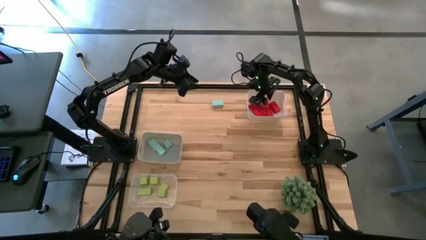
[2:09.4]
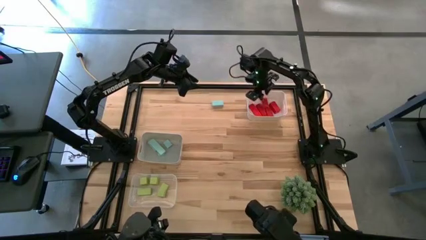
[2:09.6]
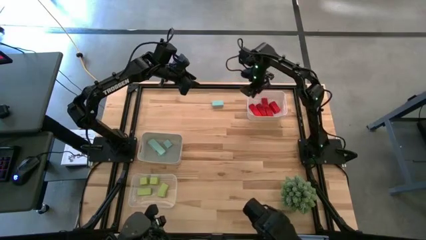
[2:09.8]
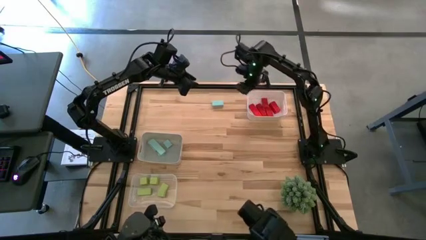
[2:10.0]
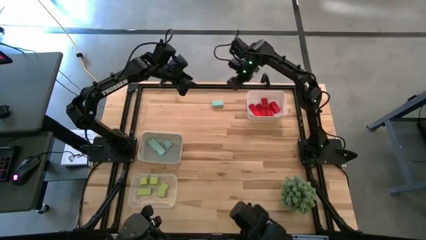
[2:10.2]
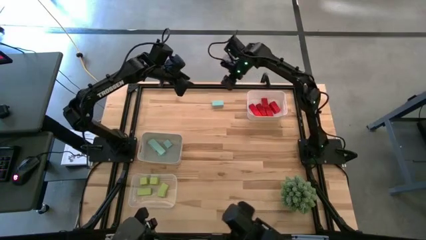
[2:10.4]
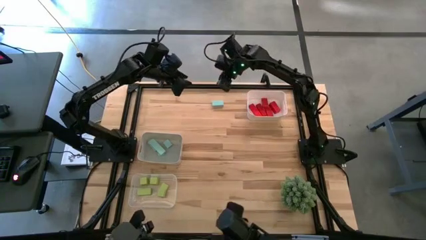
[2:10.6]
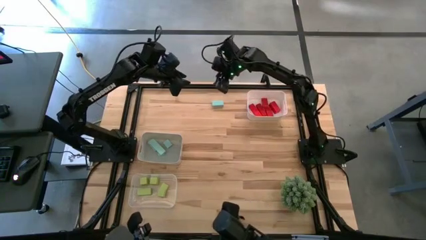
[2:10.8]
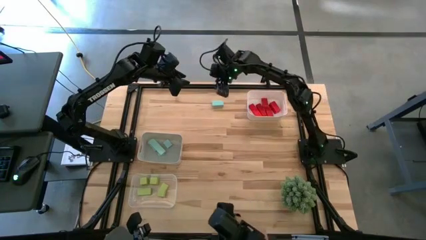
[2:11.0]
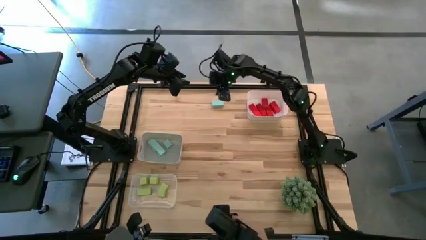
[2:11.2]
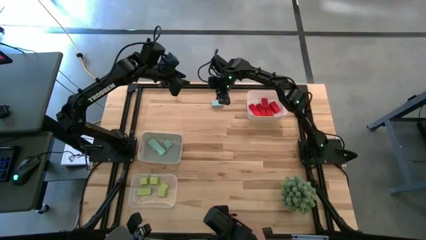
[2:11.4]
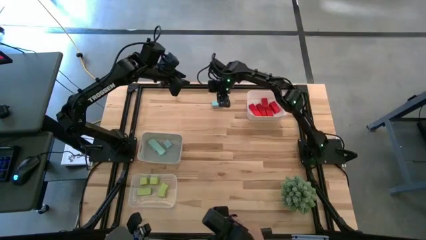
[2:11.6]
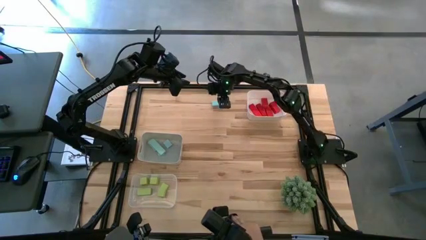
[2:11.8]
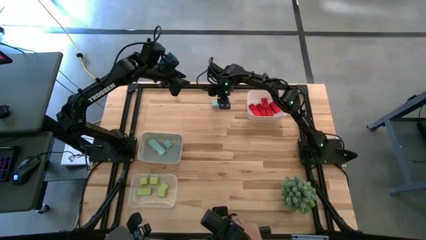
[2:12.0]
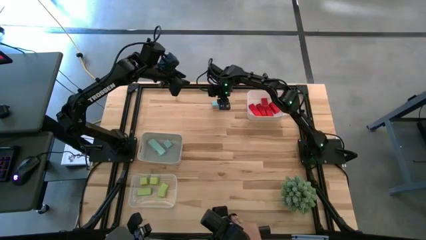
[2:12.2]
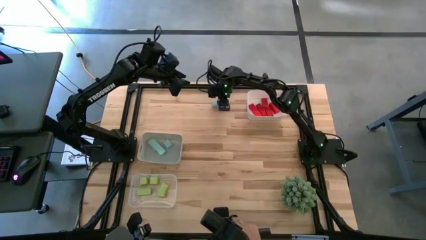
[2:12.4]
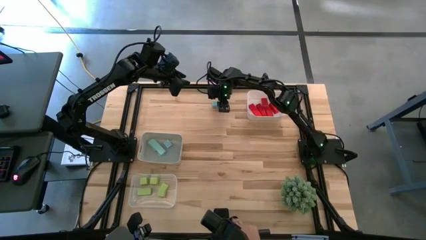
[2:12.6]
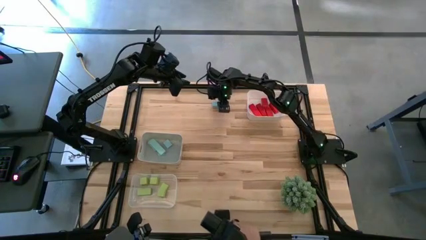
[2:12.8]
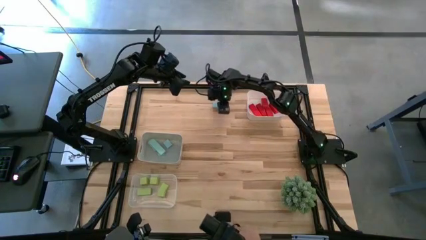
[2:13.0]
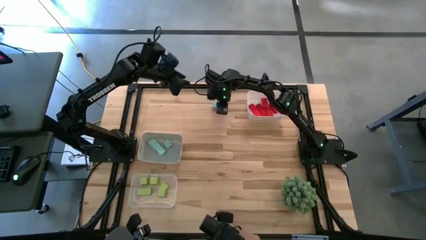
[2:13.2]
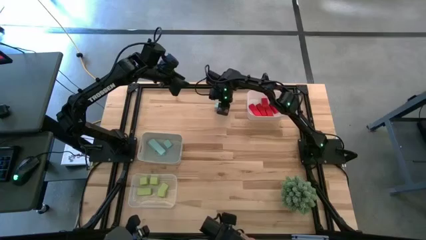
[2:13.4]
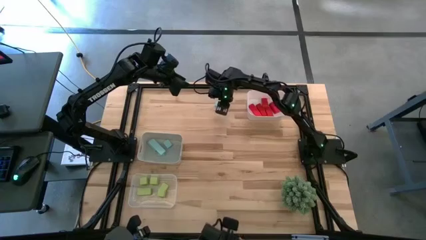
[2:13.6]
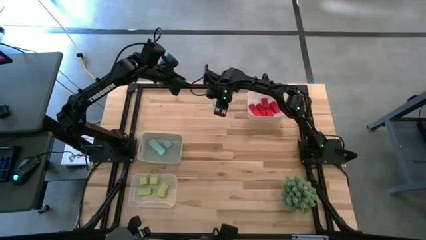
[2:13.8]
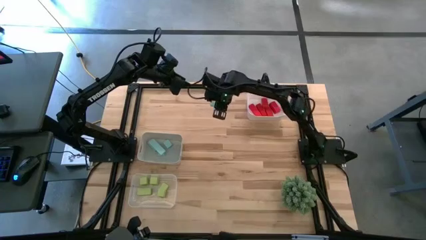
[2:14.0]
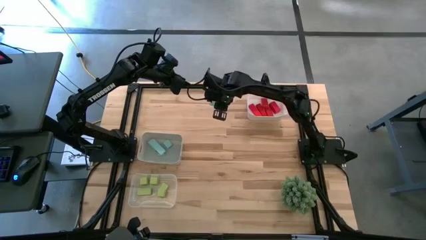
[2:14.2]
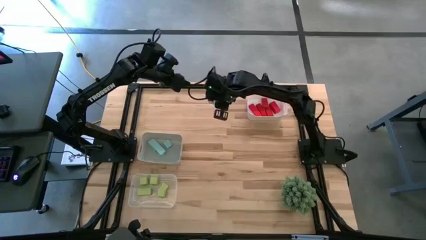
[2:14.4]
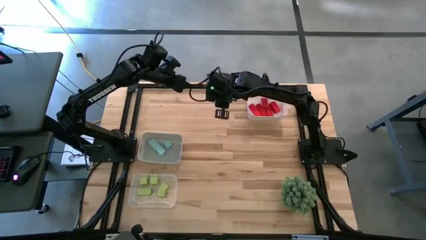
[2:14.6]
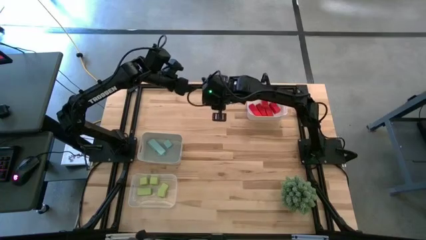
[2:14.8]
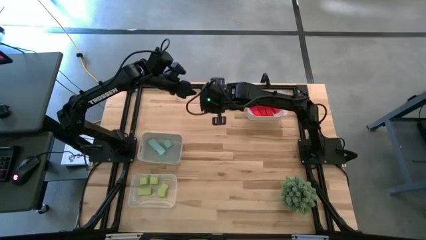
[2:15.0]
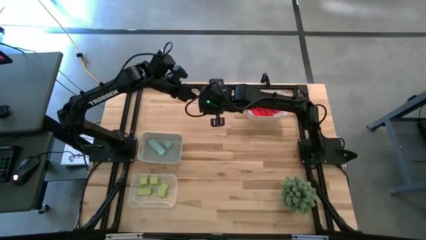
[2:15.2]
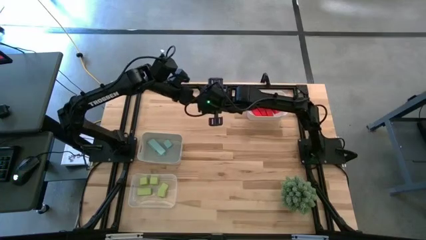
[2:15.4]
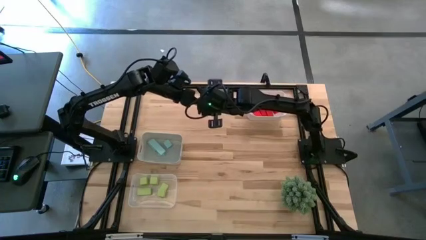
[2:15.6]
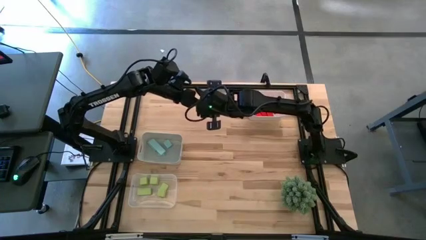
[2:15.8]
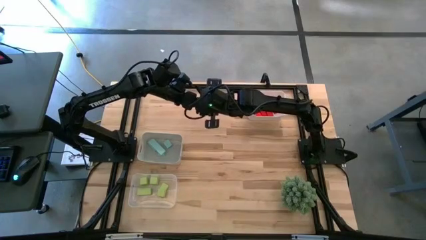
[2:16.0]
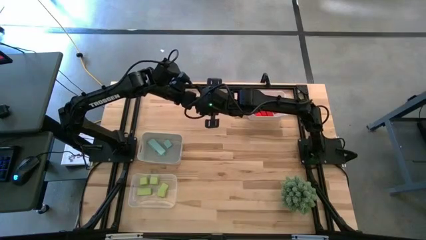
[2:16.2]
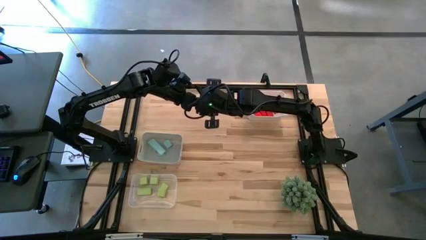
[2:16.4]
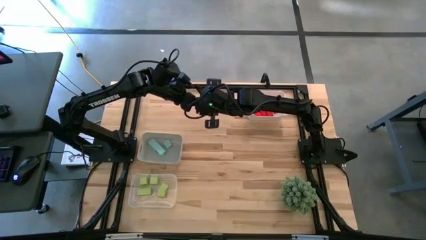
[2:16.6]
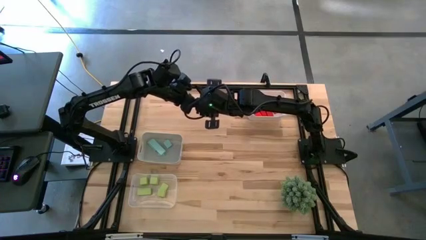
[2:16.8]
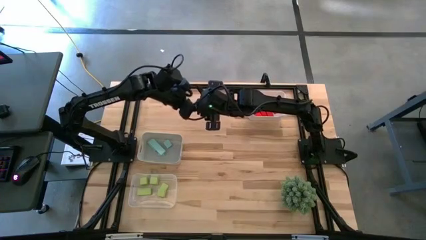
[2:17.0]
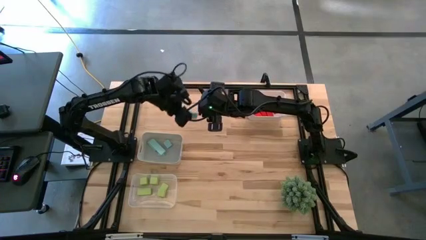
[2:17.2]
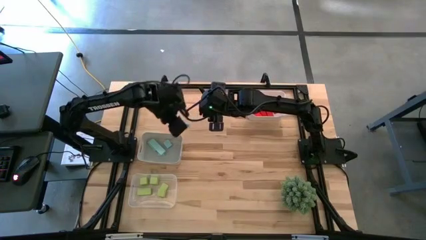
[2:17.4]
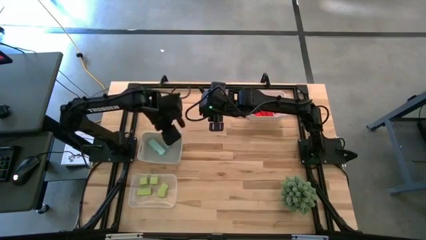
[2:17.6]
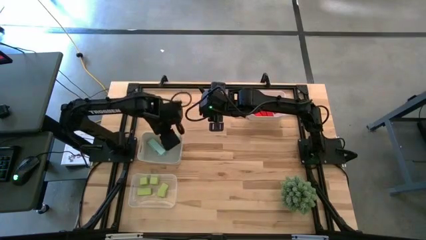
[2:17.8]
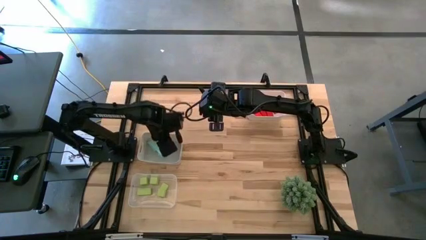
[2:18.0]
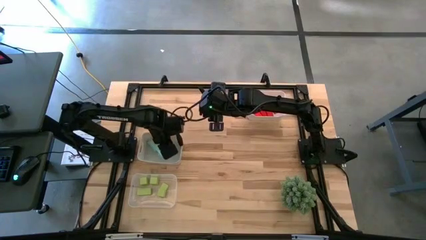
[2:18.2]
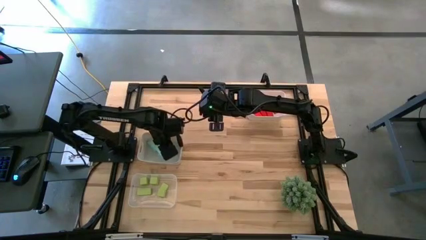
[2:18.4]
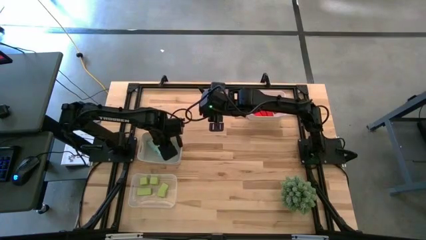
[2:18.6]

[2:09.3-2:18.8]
Task: Sort & place blocks by color
Put the blue block into the gray bin

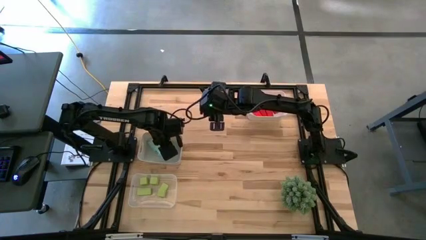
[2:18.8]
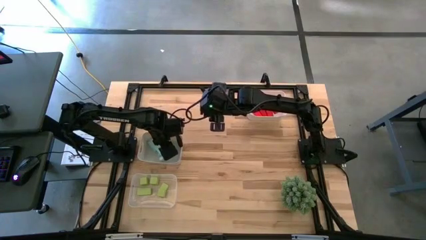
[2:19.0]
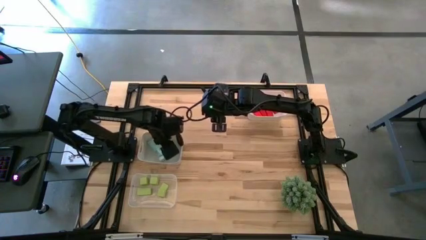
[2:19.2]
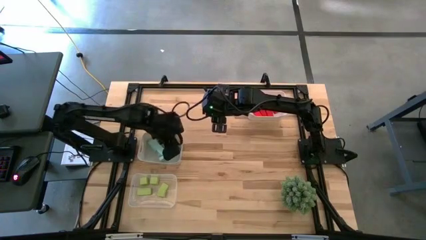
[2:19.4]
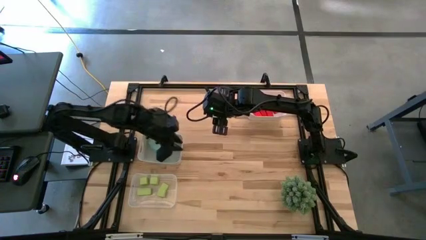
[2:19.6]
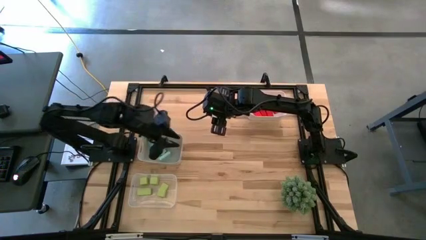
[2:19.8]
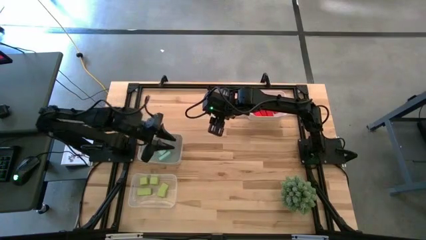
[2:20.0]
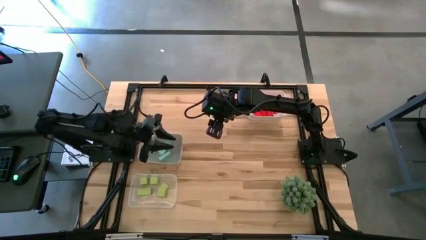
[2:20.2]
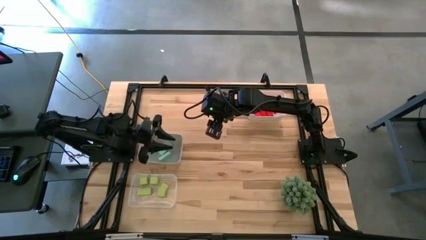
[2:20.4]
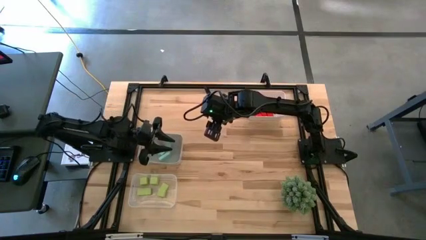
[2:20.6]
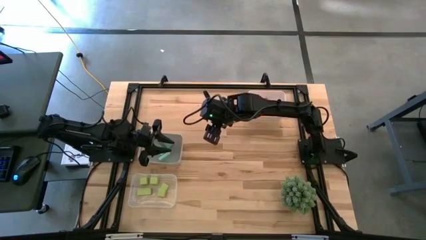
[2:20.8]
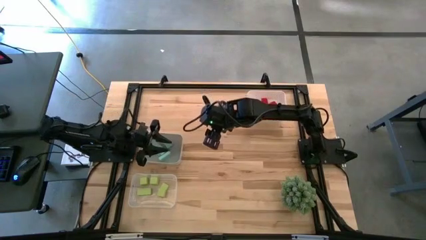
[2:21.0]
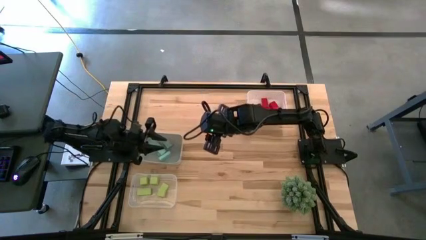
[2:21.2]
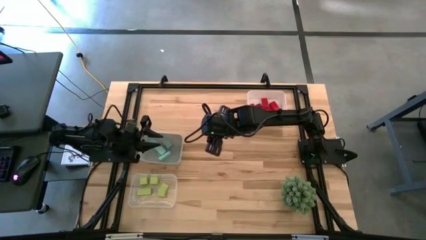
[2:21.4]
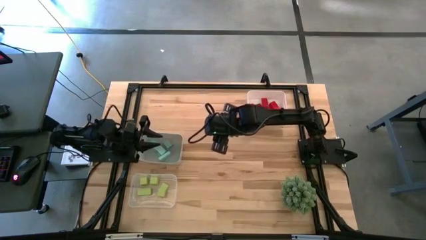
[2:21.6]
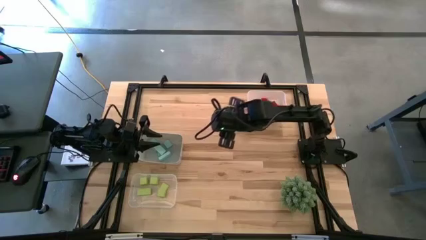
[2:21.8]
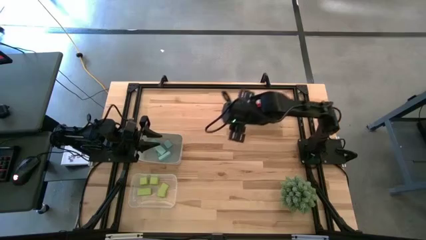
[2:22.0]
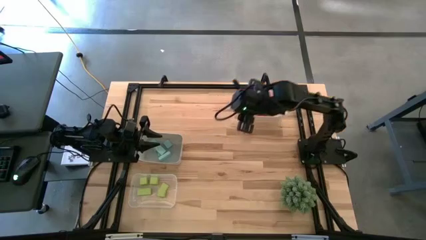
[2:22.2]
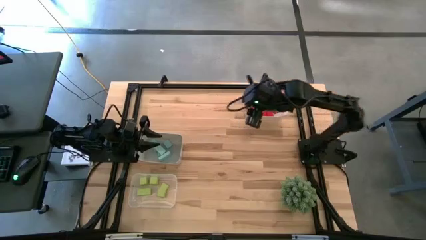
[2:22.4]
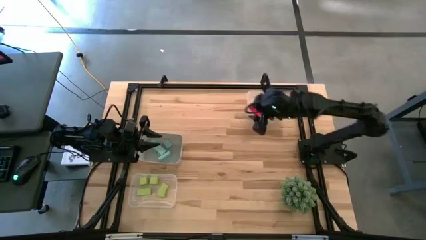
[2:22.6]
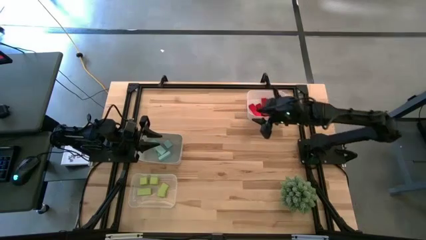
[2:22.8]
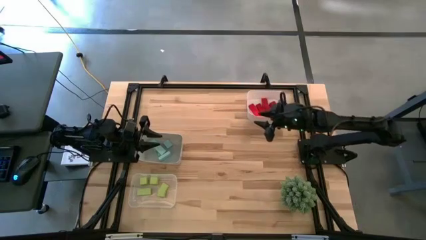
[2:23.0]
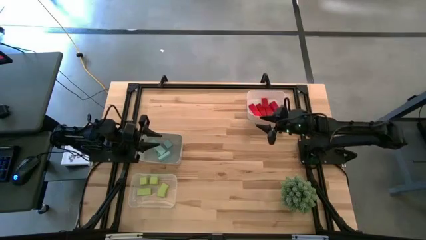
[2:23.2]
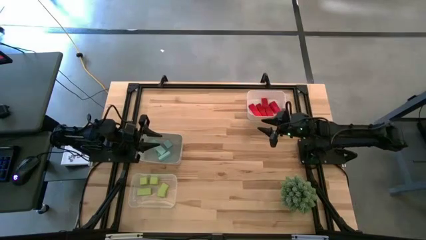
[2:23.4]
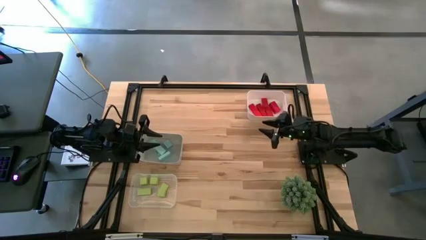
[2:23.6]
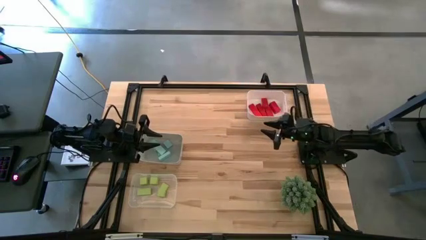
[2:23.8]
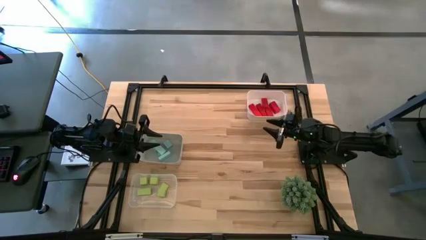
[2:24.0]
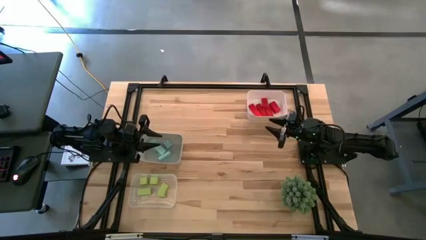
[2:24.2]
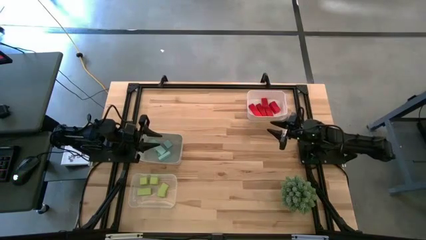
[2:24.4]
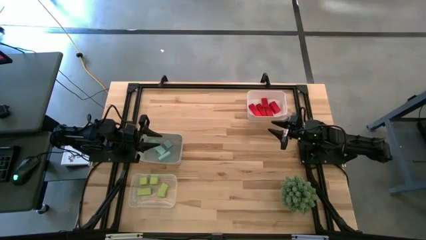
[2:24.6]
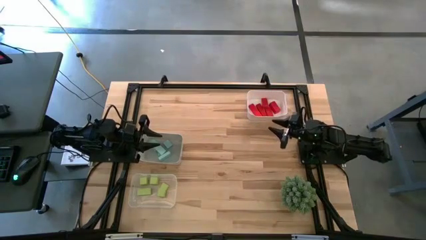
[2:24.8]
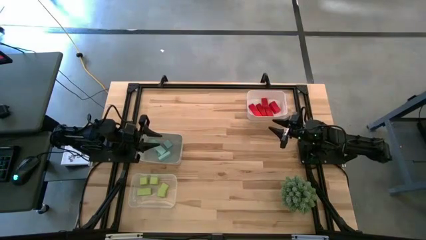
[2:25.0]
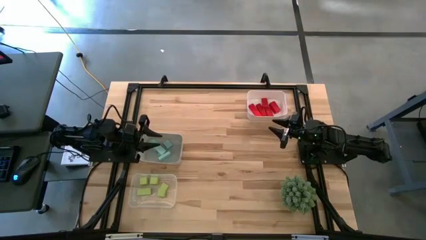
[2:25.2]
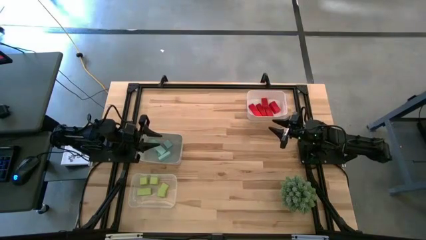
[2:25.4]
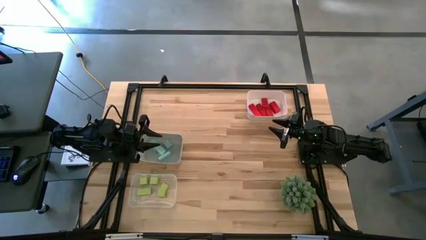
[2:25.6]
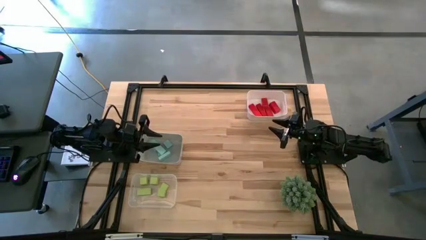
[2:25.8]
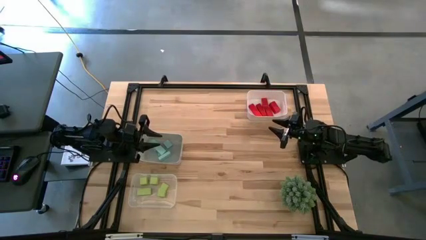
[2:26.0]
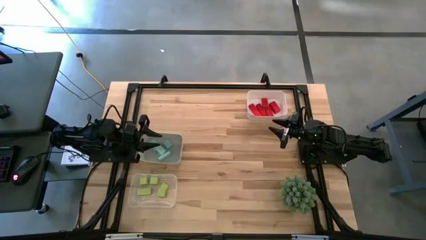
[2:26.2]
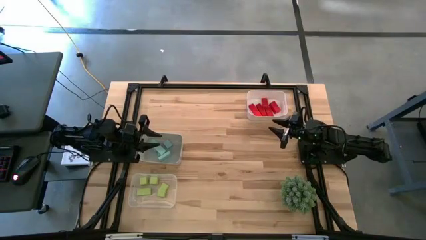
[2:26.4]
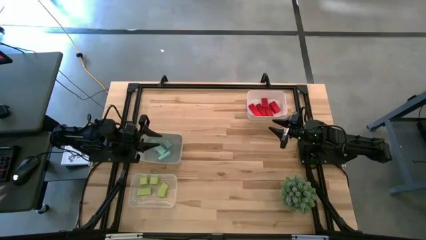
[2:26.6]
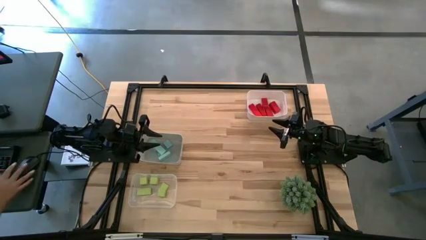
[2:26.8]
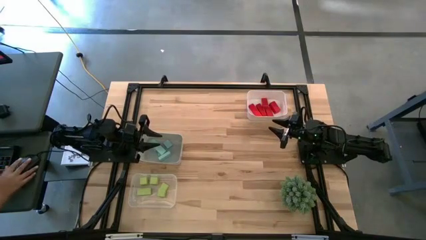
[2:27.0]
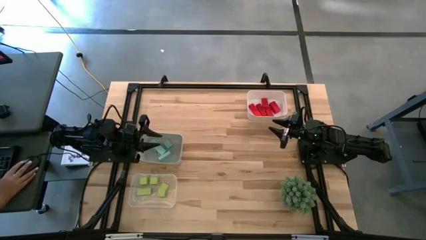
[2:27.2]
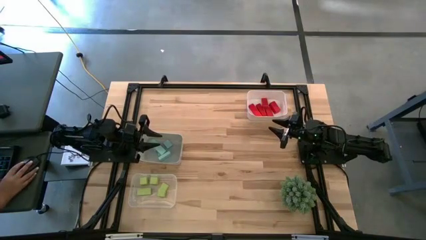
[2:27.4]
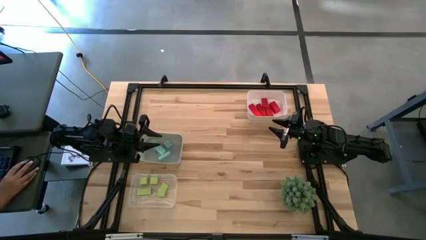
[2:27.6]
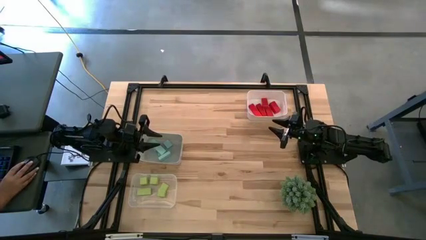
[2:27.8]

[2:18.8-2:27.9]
Return to Home Position
